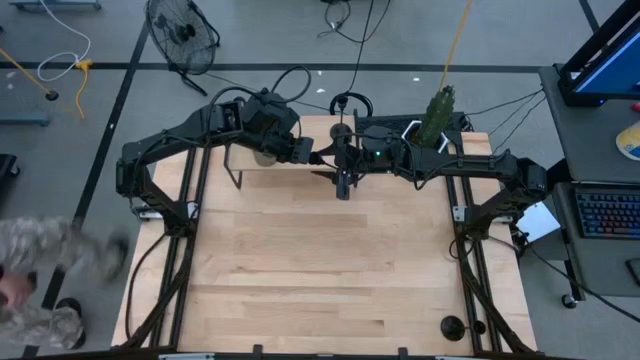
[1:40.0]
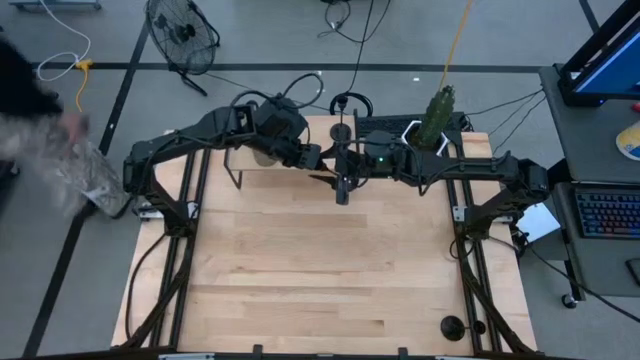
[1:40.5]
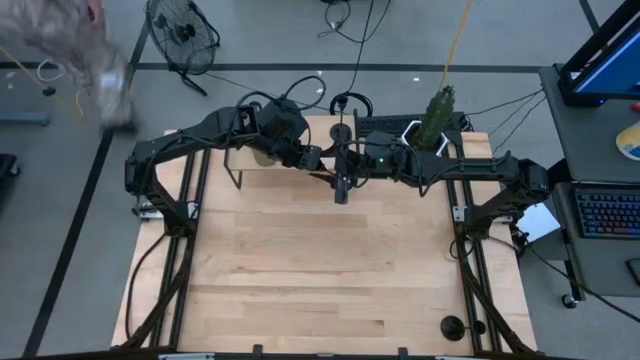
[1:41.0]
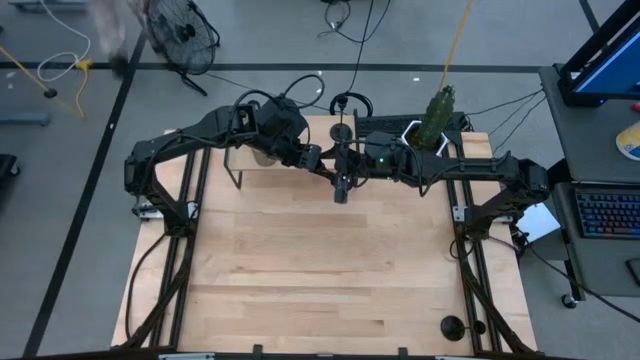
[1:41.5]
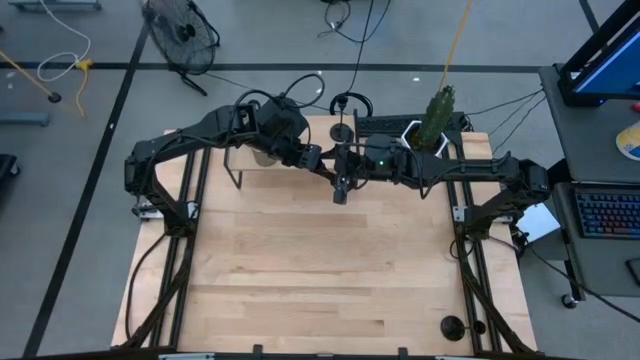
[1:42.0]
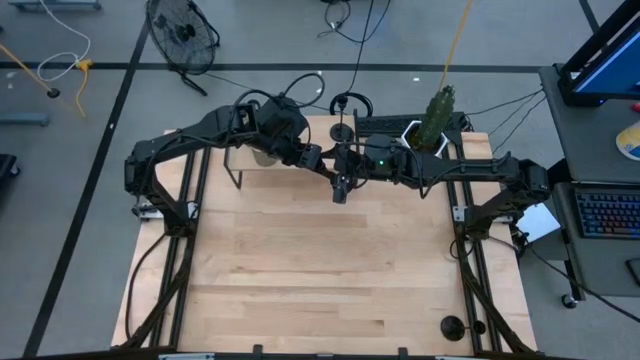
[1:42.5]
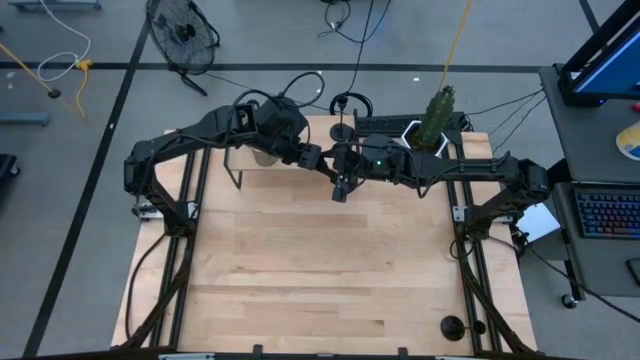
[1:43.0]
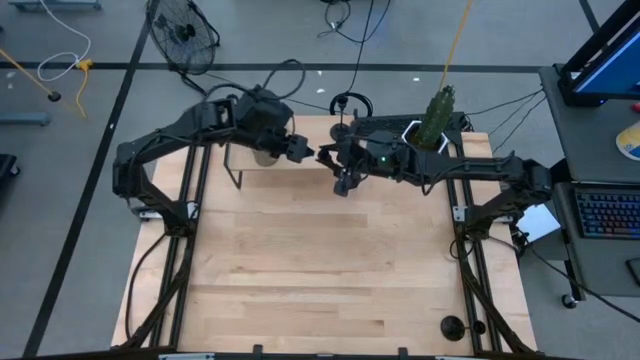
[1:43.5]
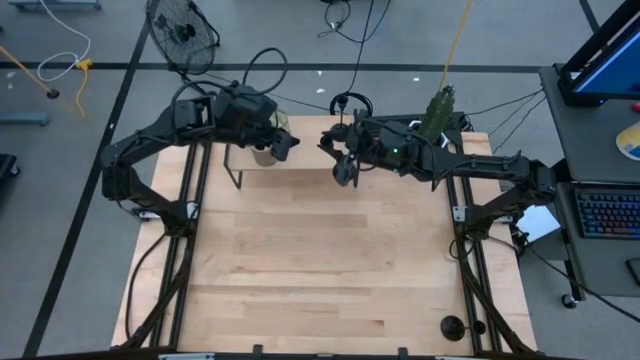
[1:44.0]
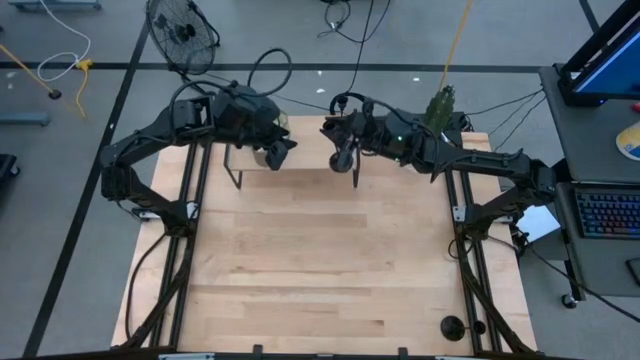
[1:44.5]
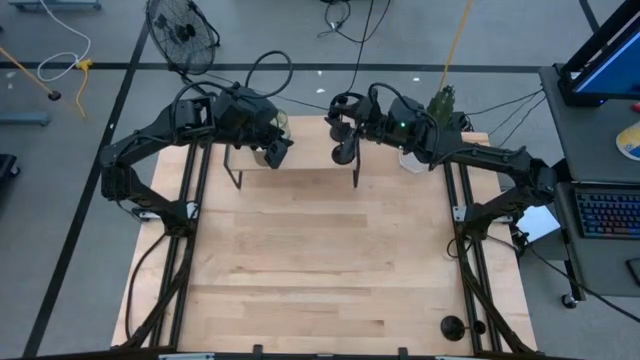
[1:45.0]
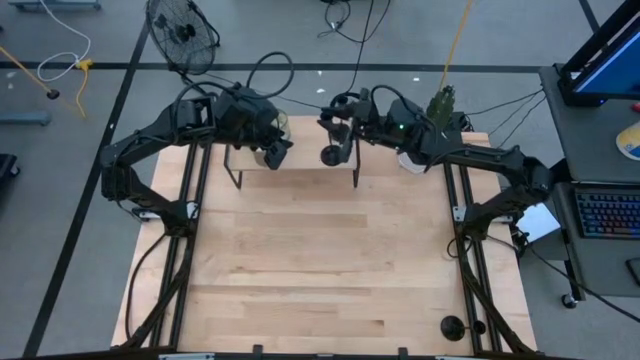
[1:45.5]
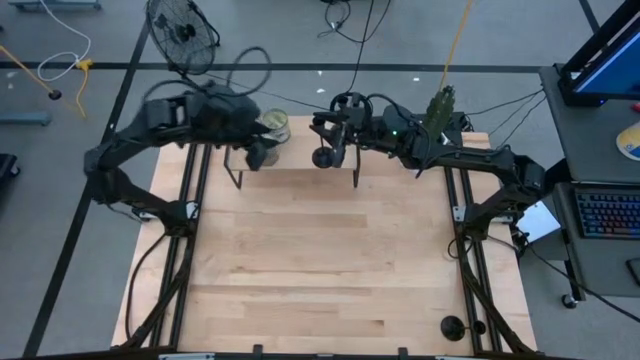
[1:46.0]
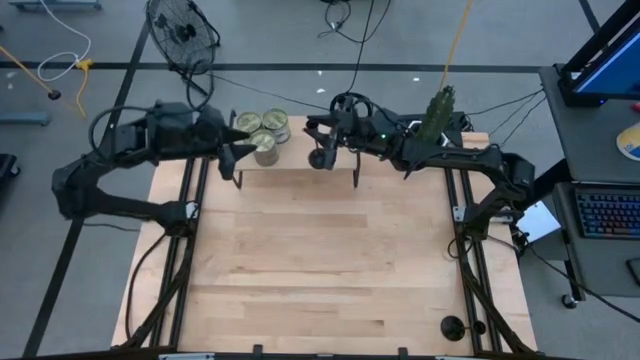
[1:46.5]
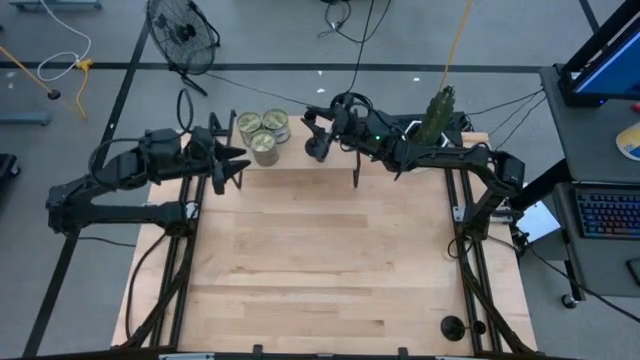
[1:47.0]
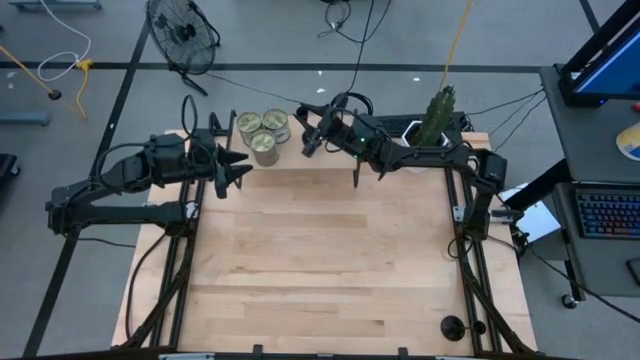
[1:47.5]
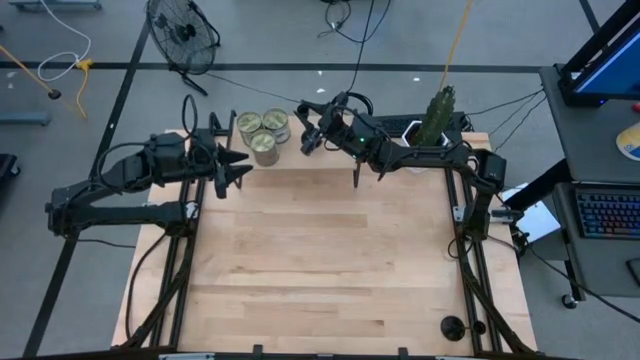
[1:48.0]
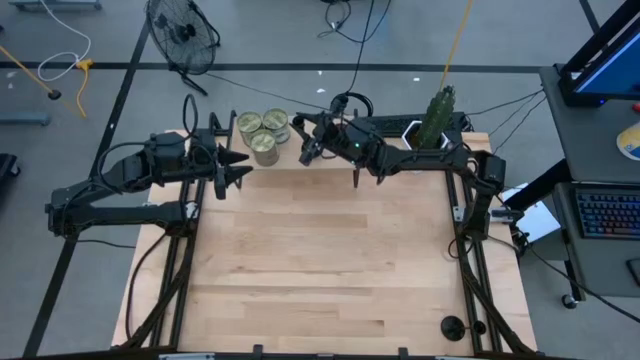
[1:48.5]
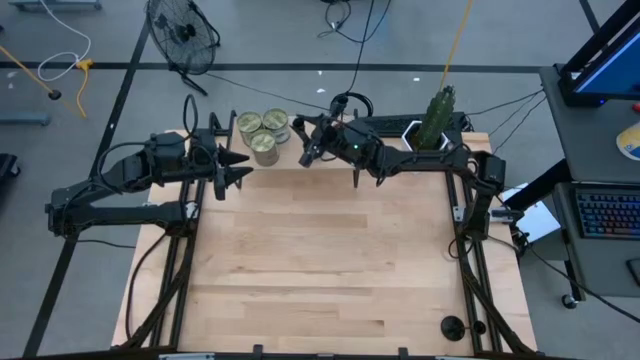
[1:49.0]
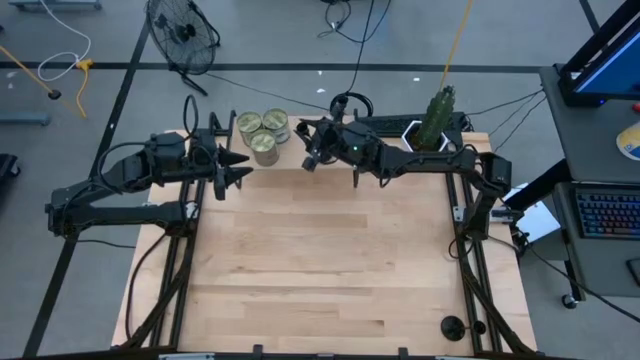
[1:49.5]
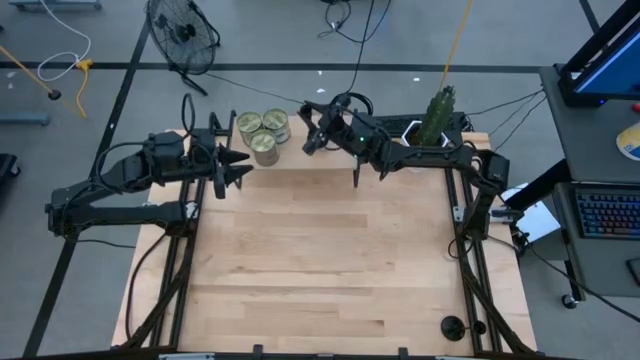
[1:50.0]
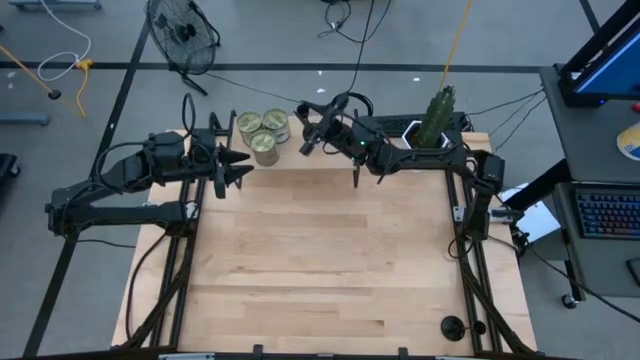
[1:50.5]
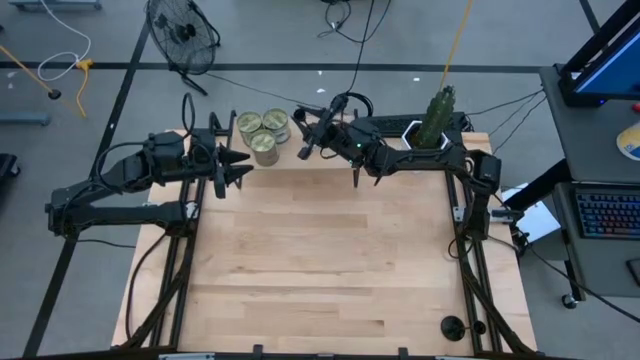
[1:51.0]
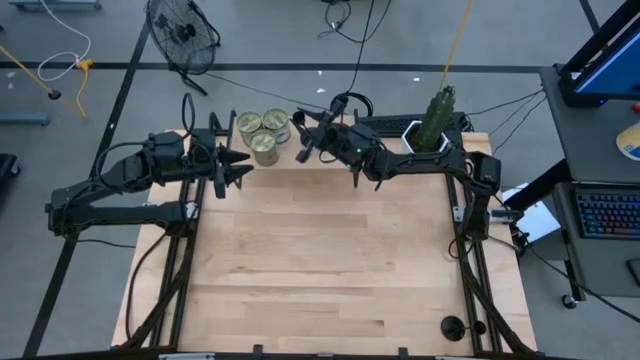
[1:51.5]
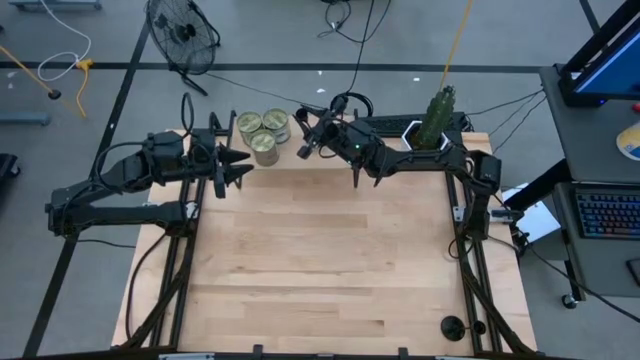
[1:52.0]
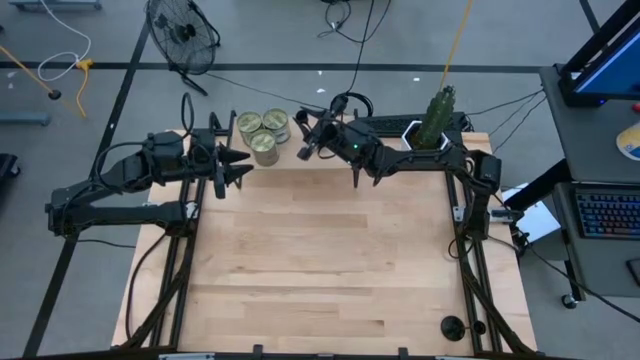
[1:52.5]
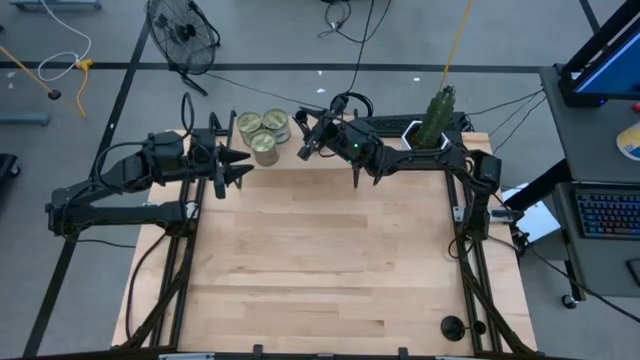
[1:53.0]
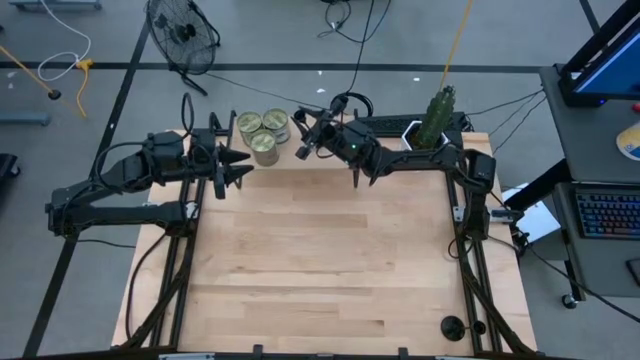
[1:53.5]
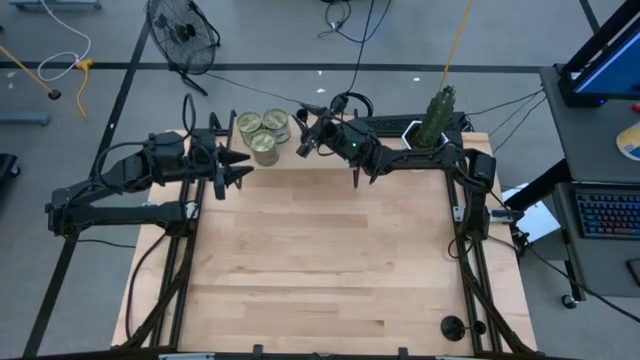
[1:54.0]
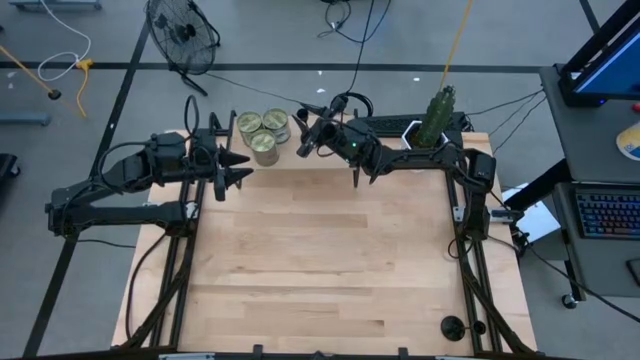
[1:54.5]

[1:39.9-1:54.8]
Task: Pick & Place candle stick holders
Put the left black candle holder on the shelf

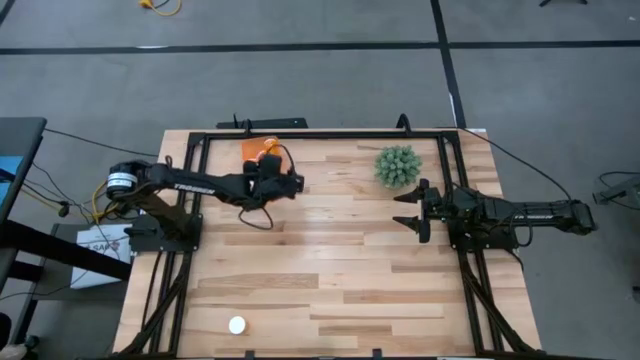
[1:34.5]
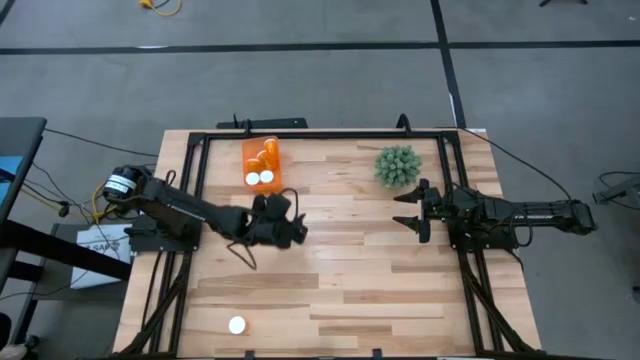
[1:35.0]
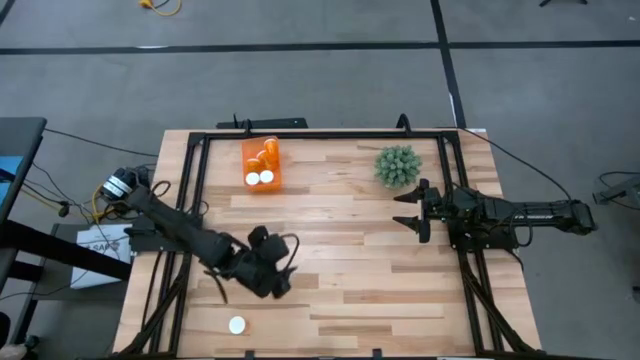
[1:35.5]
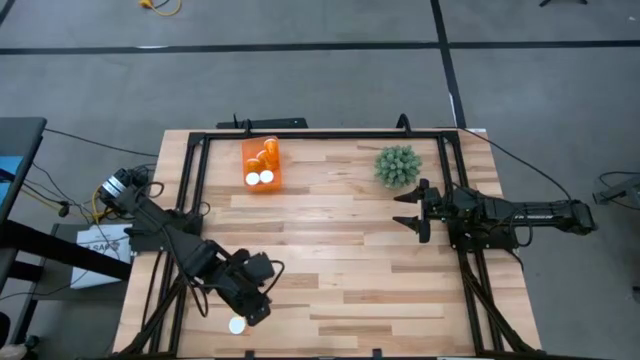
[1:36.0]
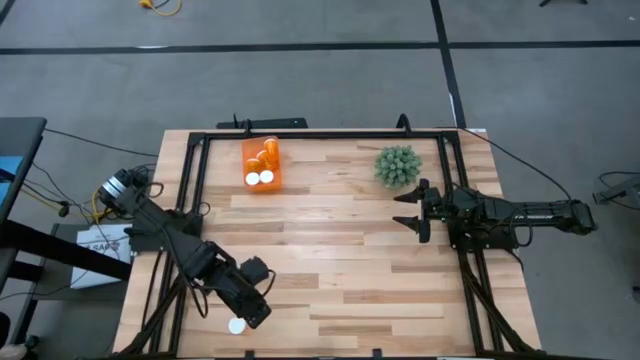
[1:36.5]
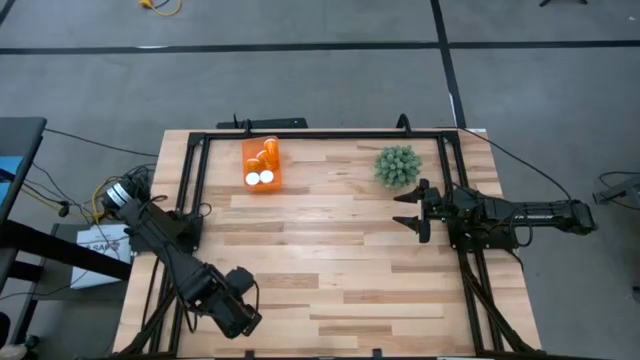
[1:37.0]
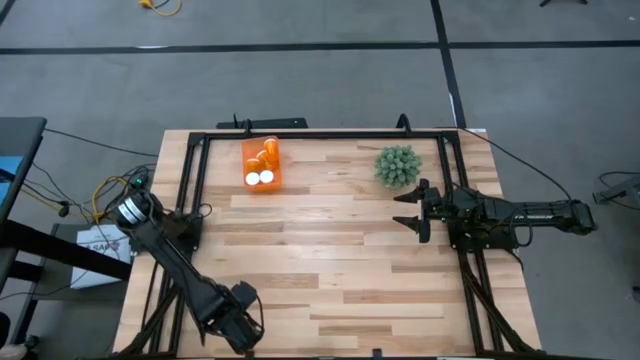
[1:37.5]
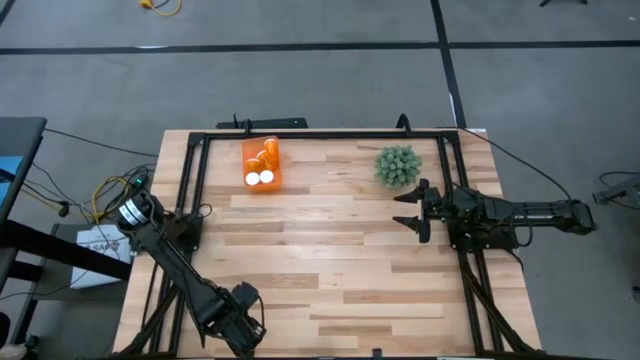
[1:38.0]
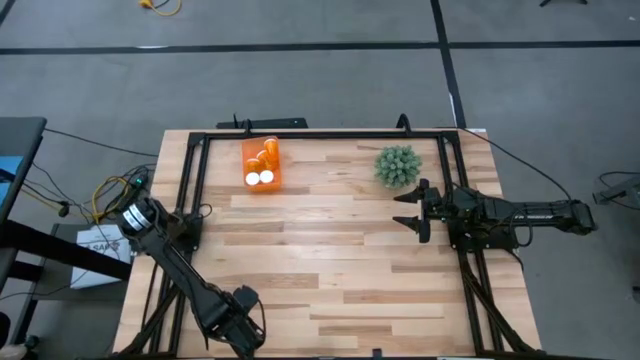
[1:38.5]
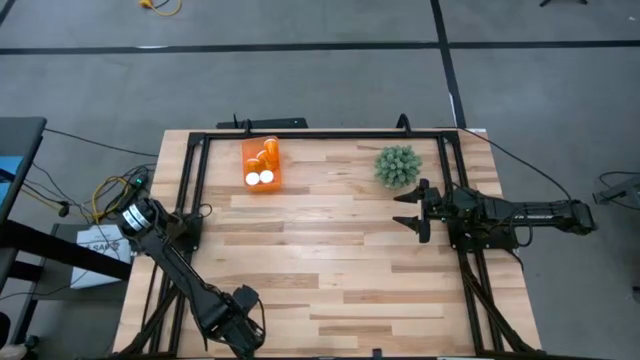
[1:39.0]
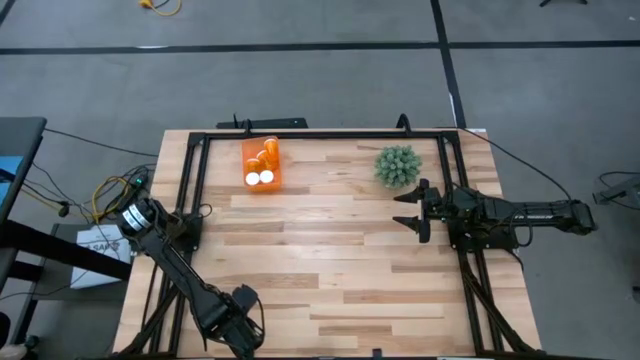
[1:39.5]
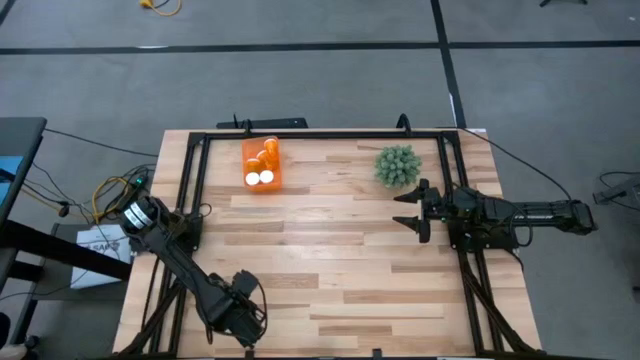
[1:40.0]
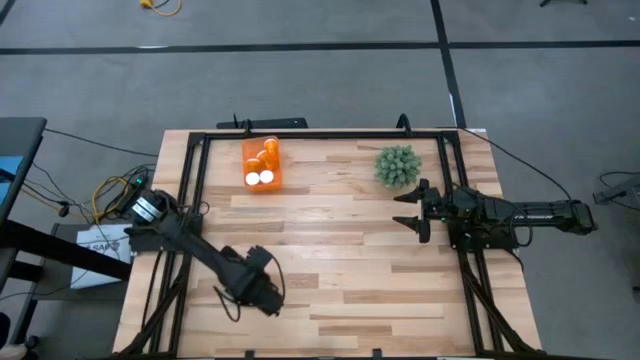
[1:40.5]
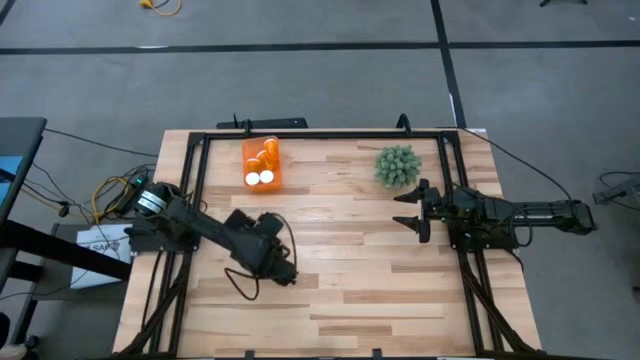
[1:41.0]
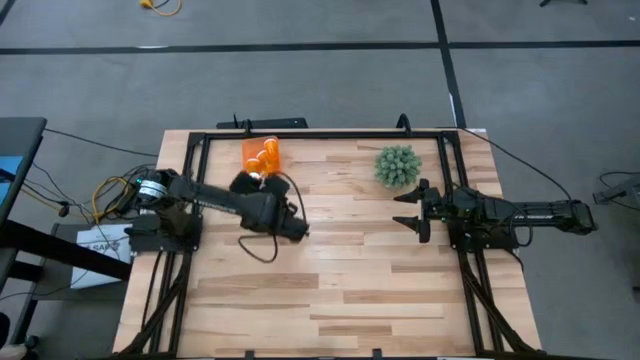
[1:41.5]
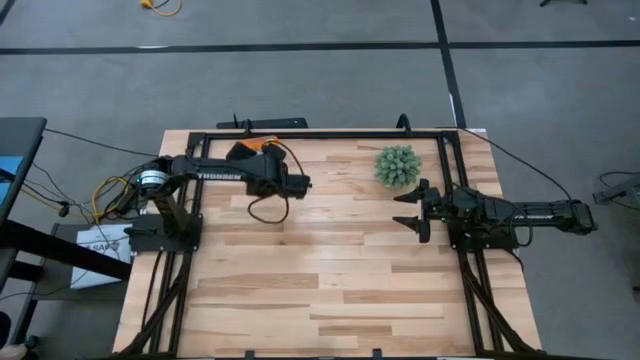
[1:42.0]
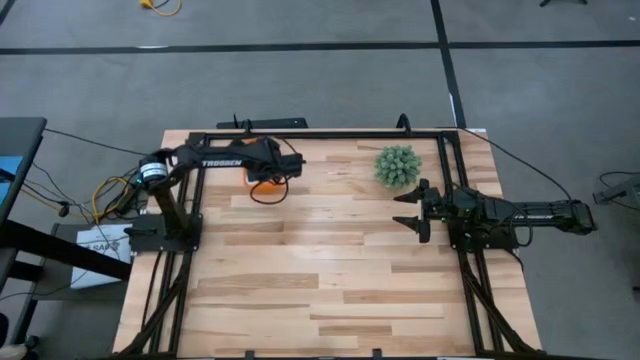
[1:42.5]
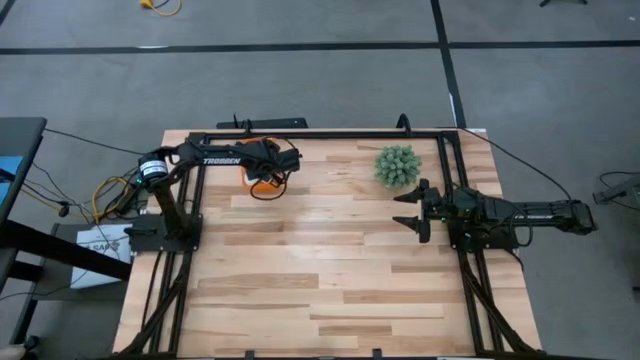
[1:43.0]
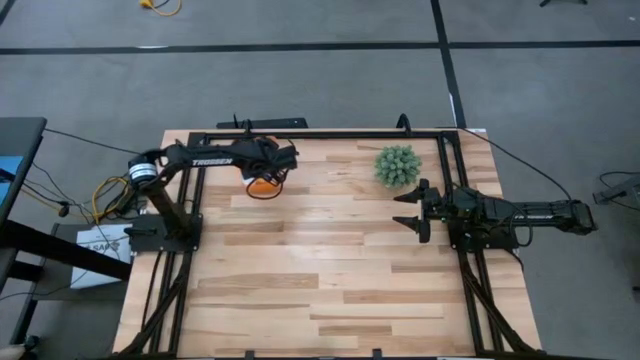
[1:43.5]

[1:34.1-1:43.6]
Task: Pick and place pill bottles into a basket
Put the orange pill bottle into the orange container
